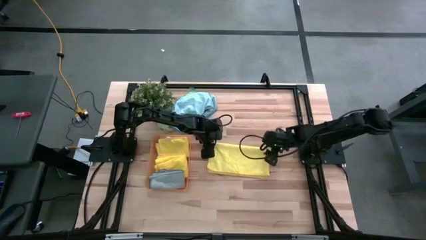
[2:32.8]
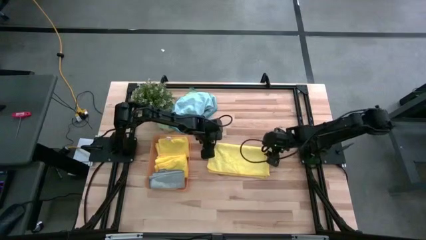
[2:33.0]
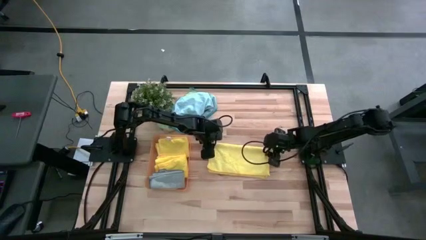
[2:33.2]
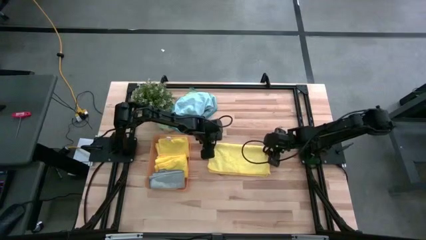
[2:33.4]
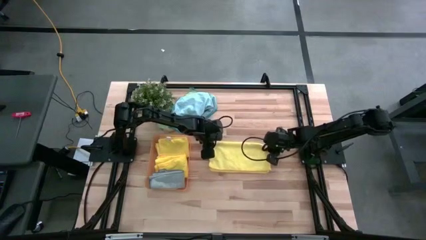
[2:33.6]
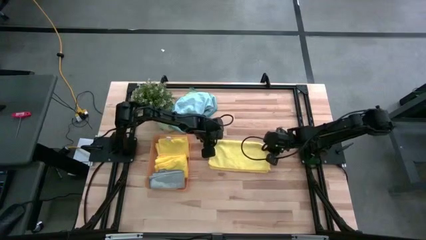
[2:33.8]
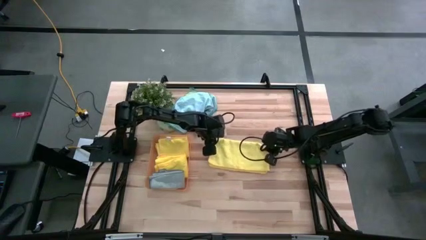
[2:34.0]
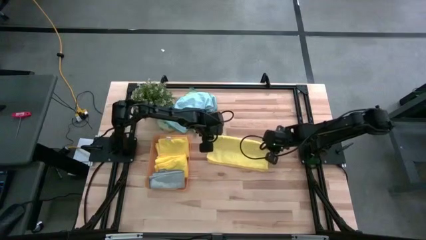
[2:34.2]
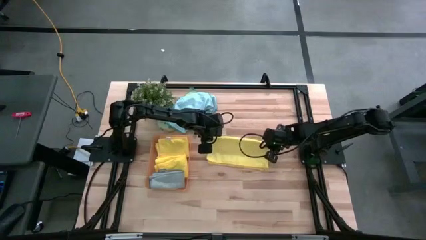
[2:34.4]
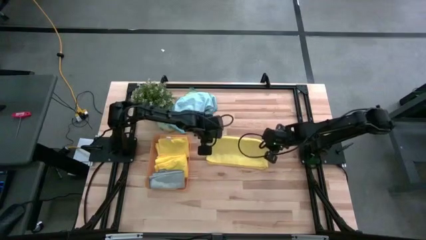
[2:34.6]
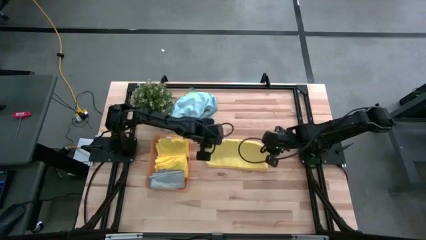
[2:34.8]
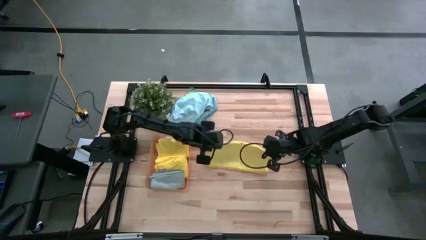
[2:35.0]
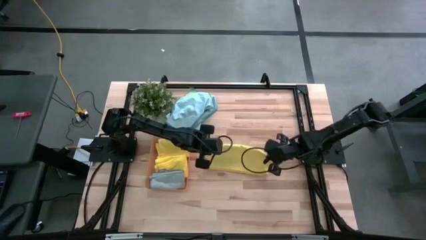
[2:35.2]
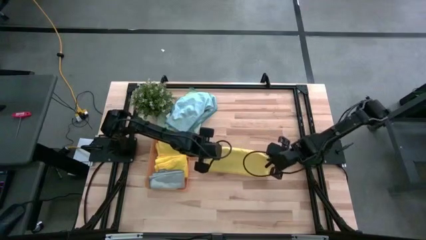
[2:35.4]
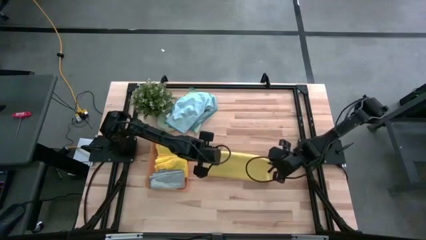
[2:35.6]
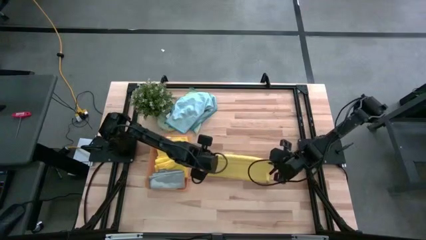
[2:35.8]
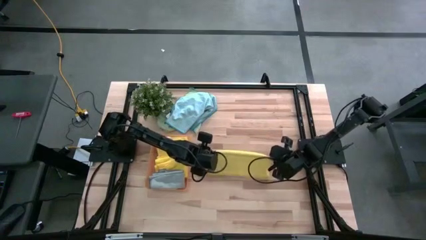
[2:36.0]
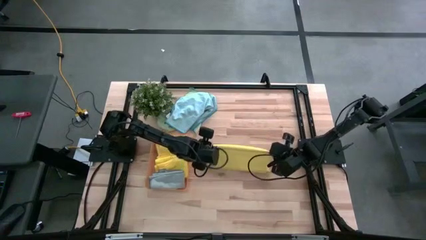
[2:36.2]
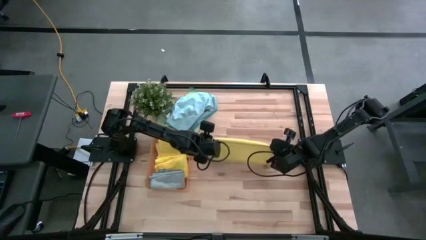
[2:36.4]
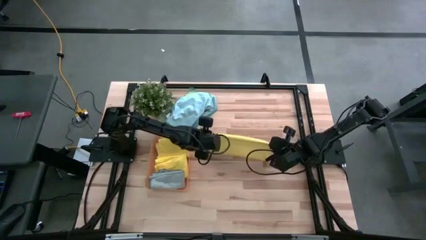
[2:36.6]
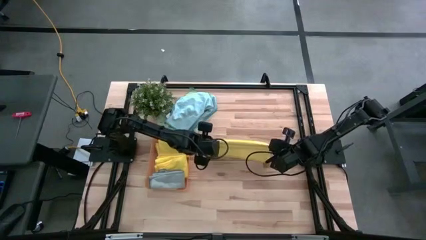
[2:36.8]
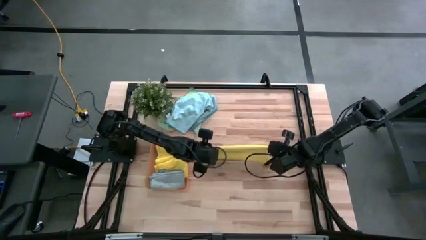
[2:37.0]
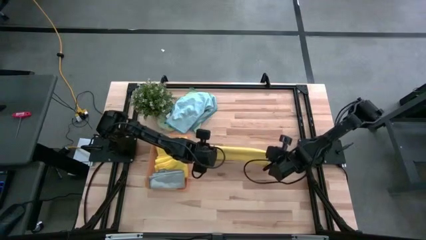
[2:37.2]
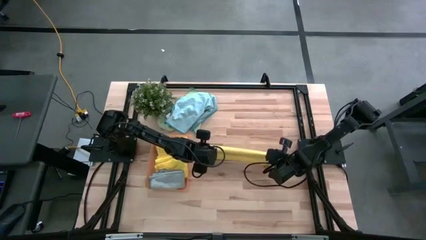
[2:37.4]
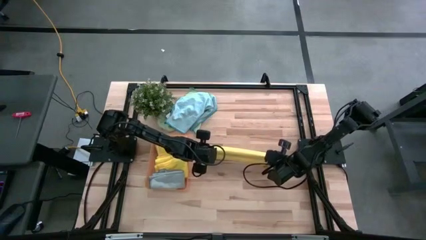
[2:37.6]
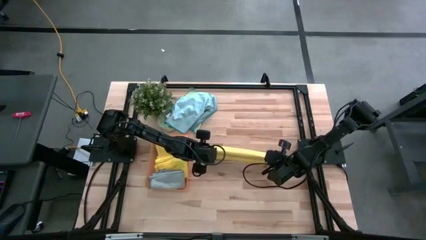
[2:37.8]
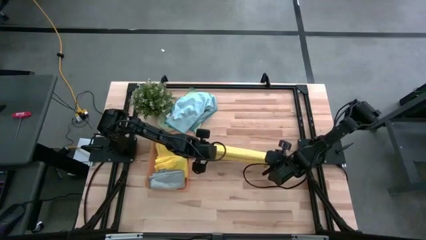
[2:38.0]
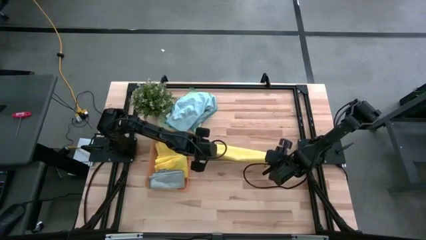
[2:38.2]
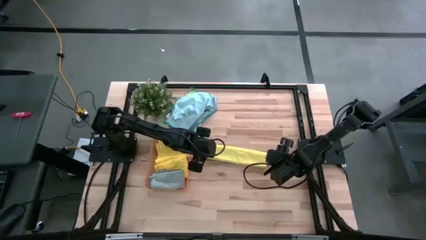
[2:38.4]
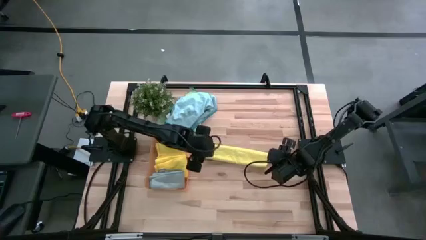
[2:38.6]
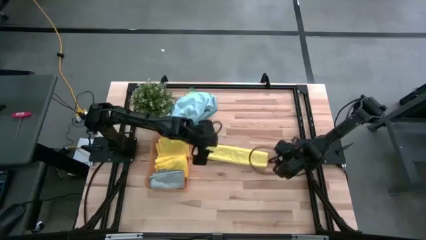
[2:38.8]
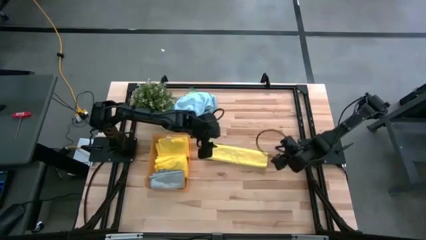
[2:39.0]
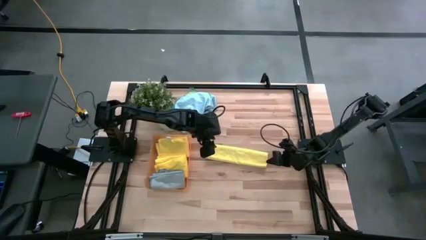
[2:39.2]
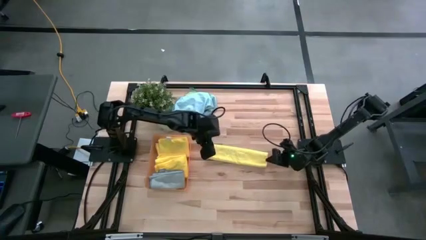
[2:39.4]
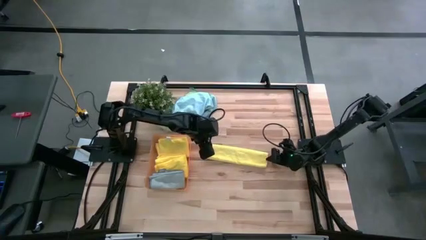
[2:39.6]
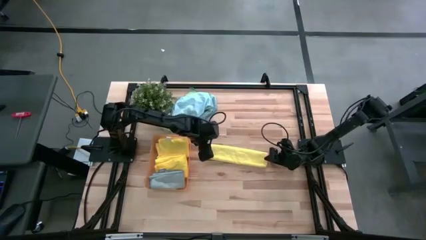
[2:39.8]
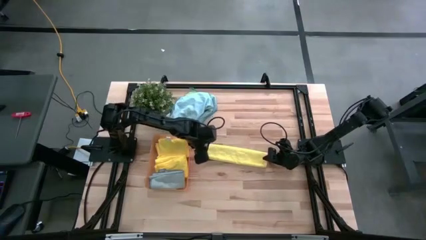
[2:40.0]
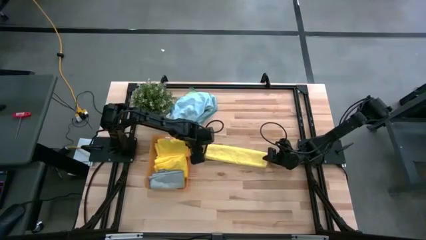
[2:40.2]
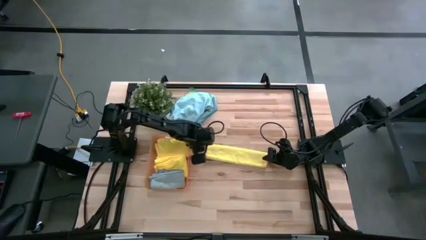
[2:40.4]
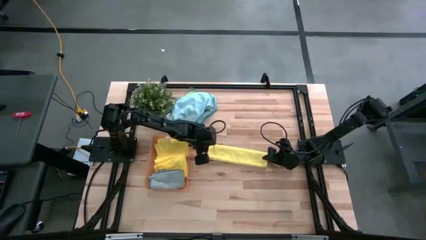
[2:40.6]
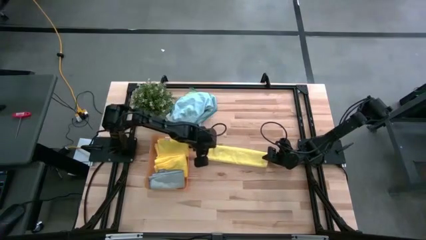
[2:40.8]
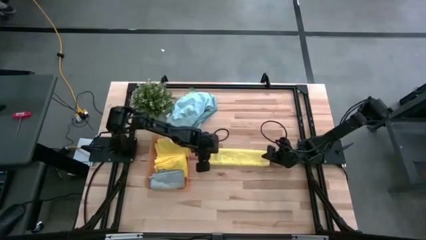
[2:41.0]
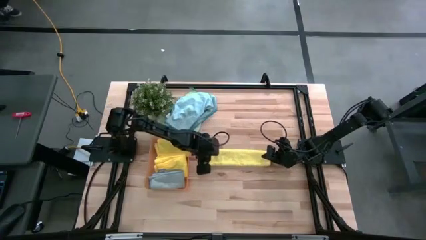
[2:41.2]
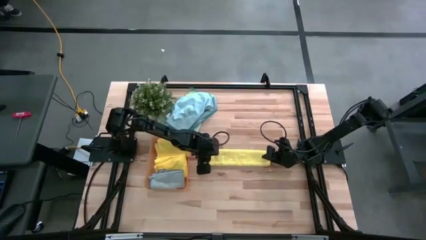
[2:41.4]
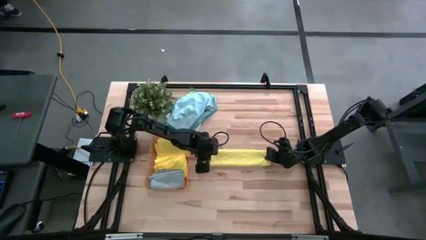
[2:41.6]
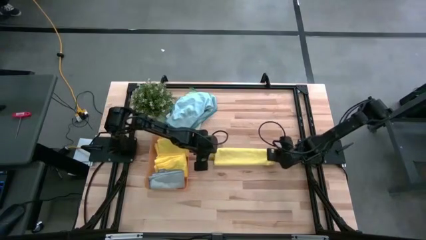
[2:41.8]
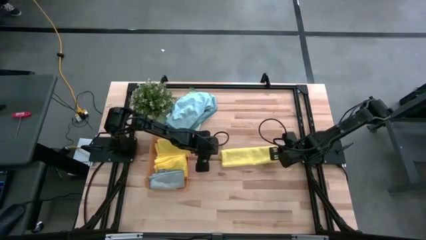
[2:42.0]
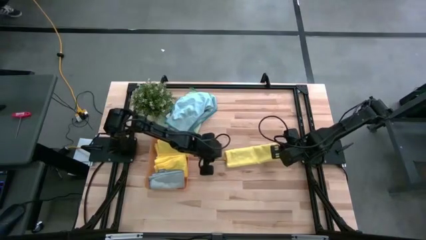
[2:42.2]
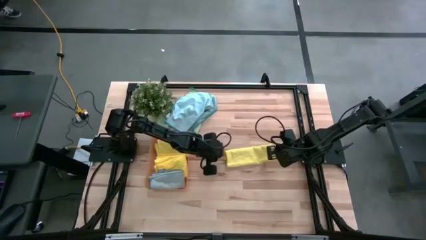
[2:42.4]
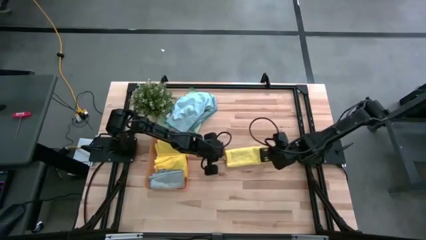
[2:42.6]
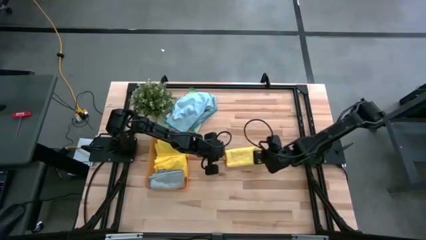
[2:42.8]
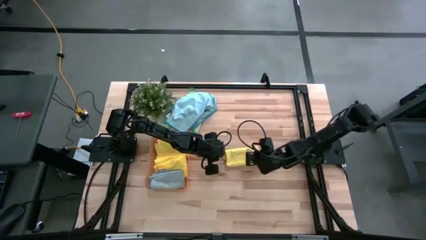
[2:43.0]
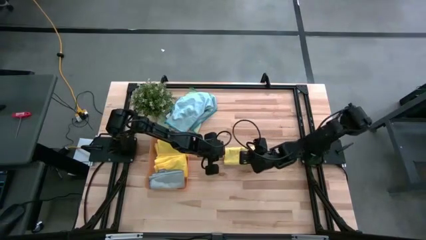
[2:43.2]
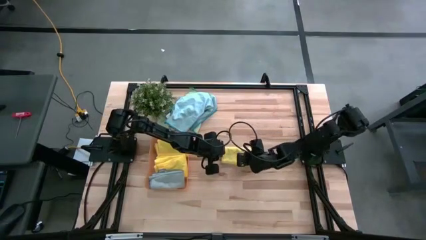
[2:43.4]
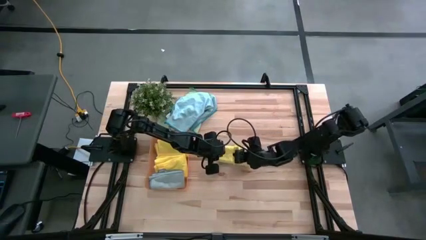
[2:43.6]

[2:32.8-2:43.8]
Task: Fold microfiber towels
Fold the yellow microfiber towel
